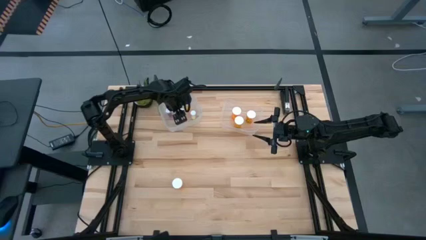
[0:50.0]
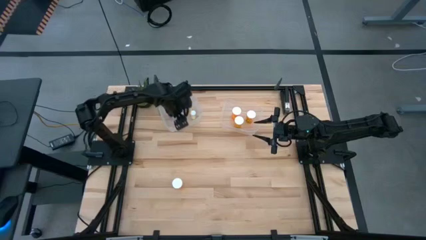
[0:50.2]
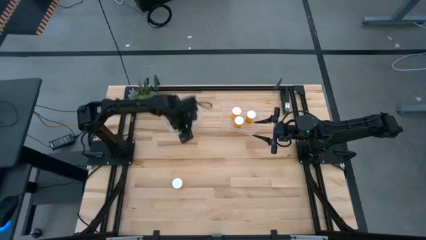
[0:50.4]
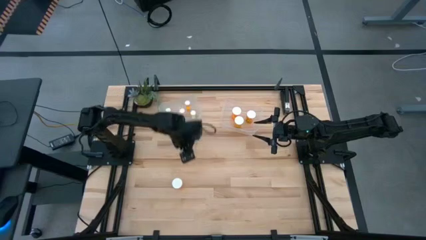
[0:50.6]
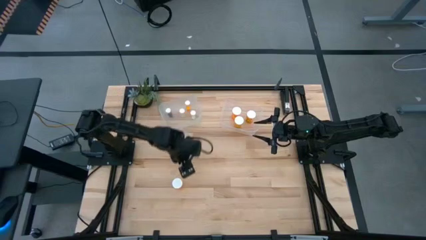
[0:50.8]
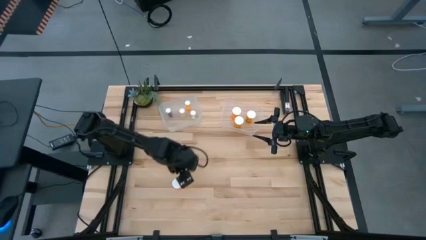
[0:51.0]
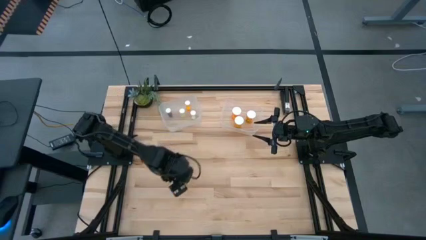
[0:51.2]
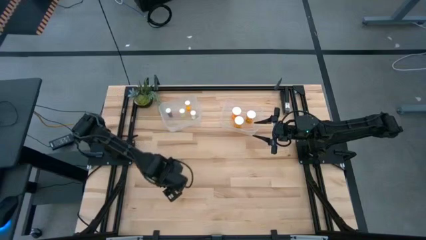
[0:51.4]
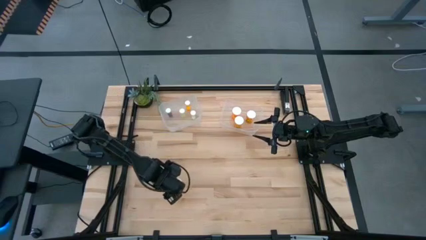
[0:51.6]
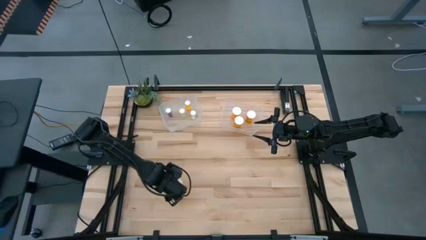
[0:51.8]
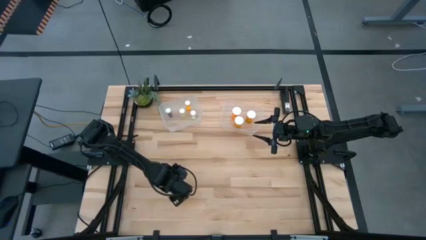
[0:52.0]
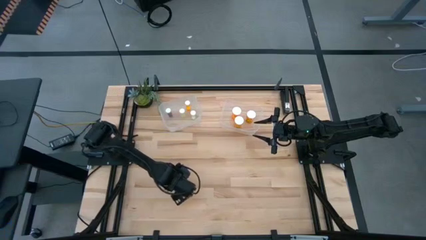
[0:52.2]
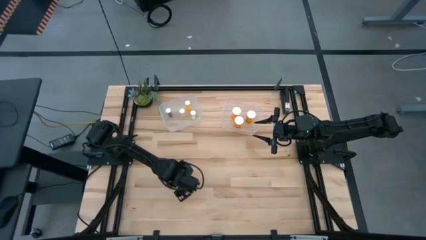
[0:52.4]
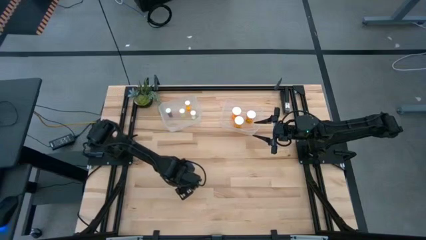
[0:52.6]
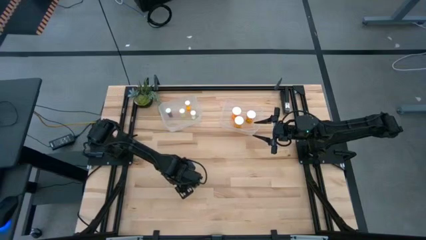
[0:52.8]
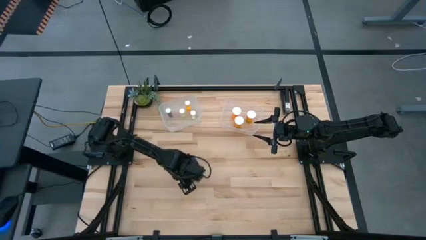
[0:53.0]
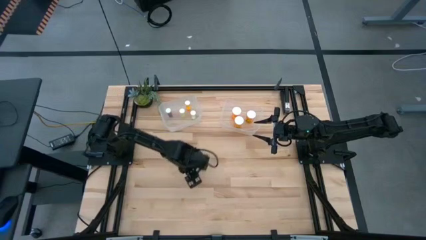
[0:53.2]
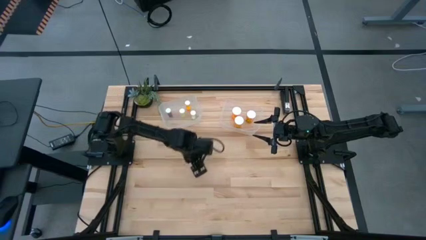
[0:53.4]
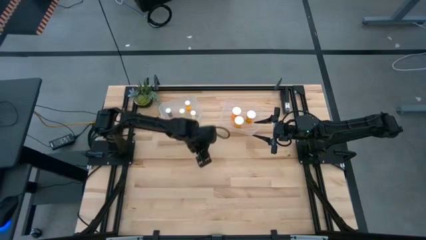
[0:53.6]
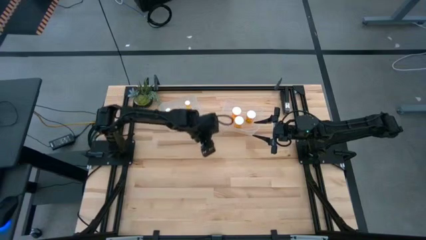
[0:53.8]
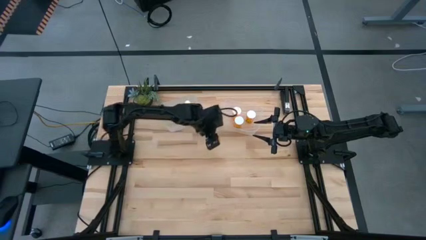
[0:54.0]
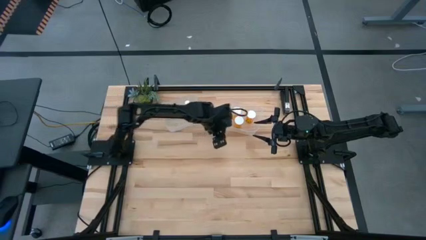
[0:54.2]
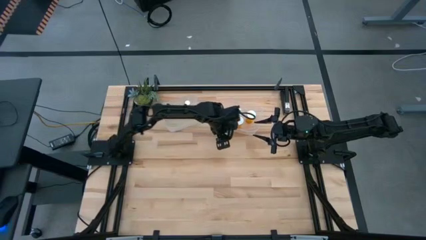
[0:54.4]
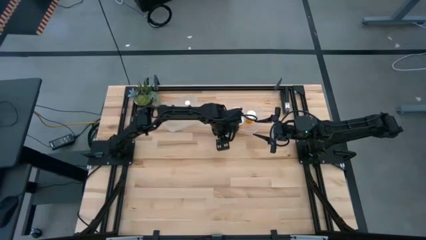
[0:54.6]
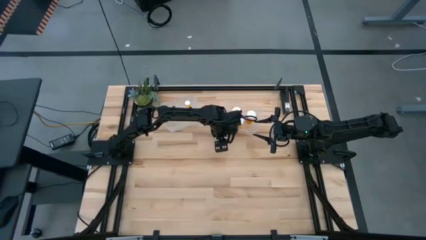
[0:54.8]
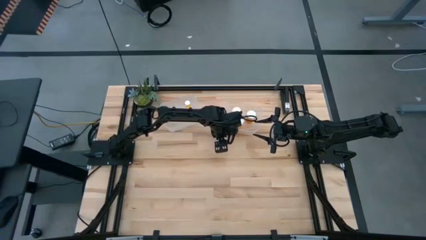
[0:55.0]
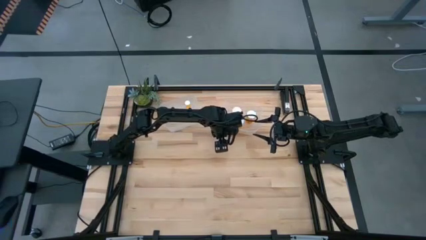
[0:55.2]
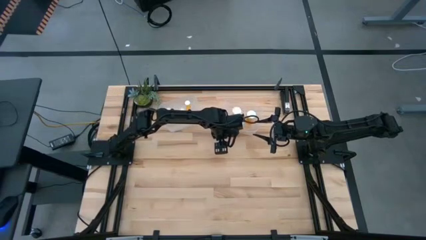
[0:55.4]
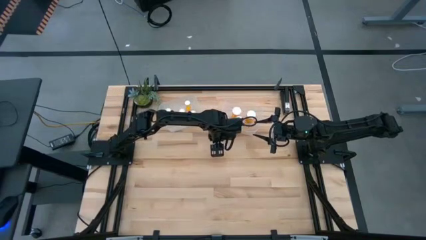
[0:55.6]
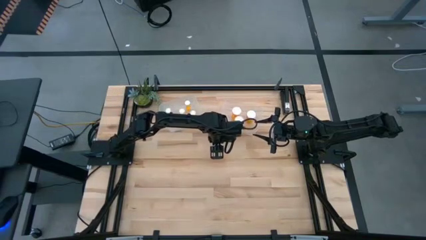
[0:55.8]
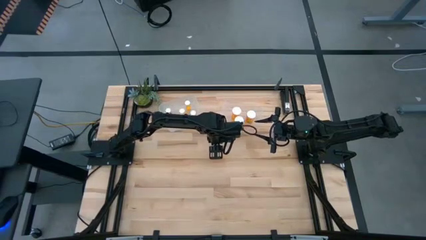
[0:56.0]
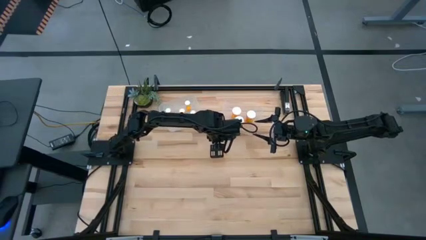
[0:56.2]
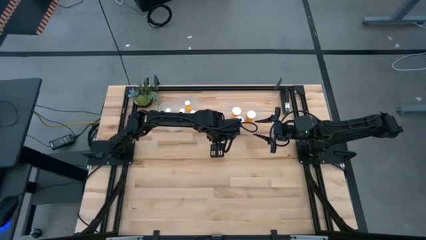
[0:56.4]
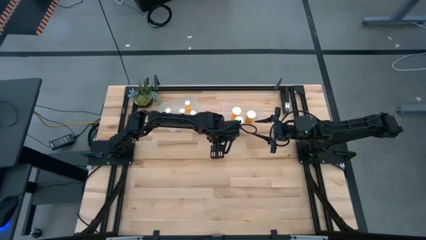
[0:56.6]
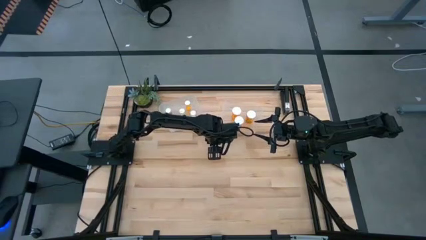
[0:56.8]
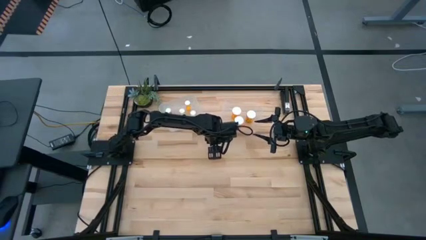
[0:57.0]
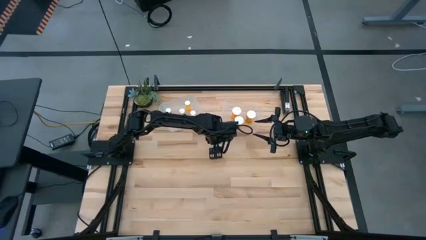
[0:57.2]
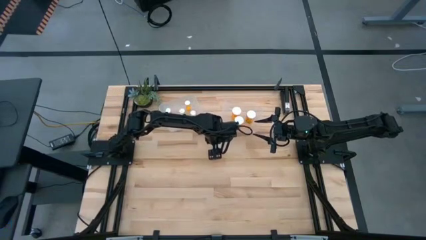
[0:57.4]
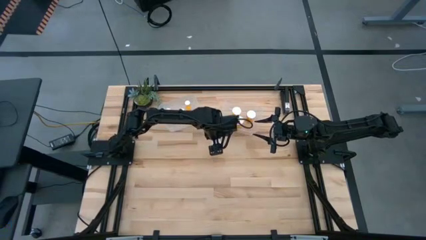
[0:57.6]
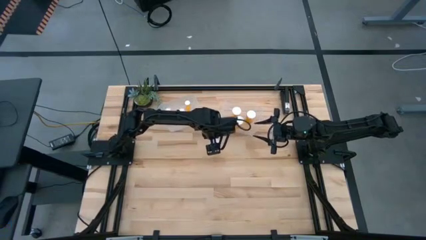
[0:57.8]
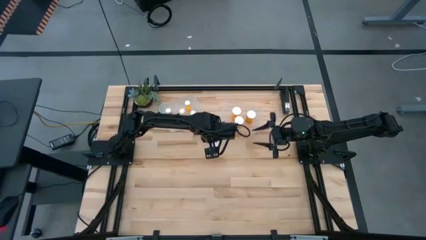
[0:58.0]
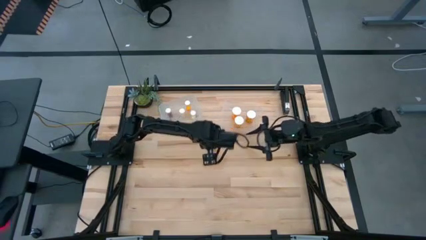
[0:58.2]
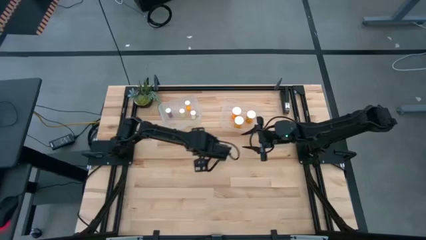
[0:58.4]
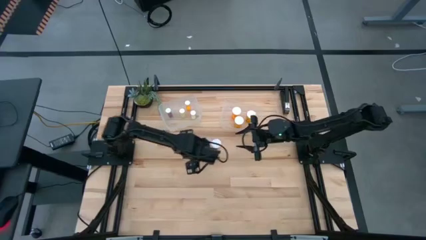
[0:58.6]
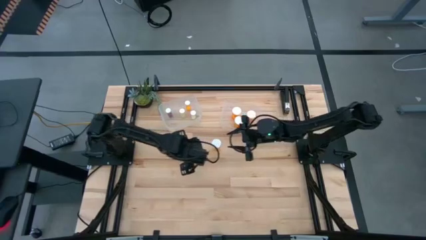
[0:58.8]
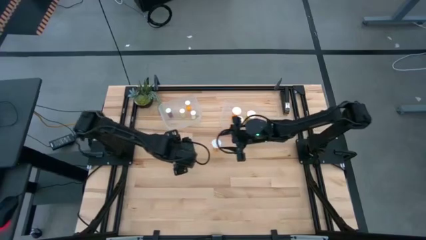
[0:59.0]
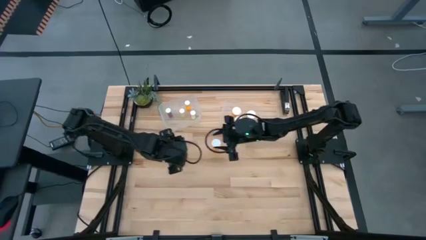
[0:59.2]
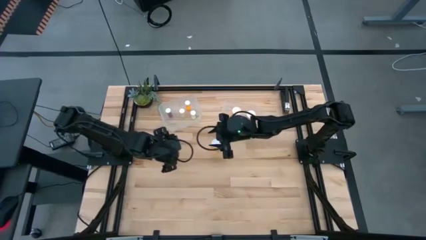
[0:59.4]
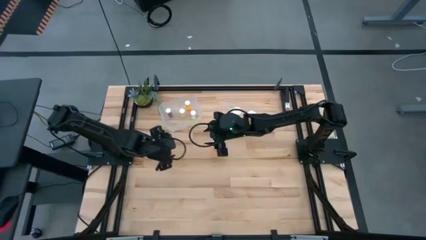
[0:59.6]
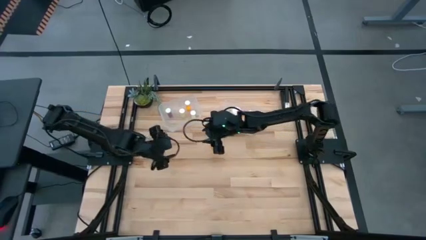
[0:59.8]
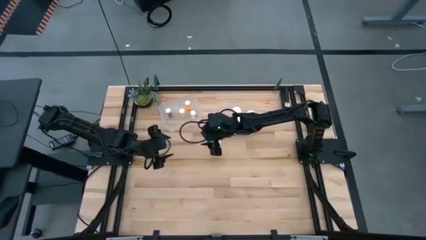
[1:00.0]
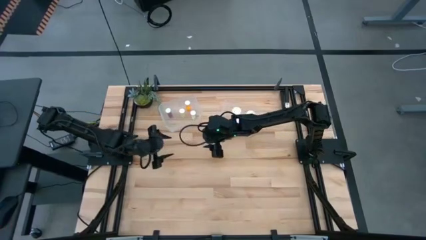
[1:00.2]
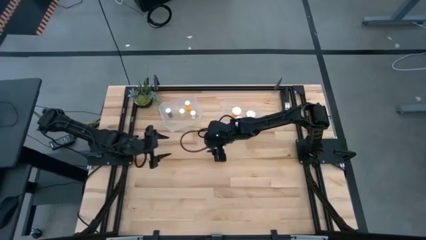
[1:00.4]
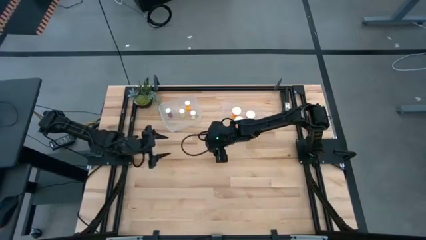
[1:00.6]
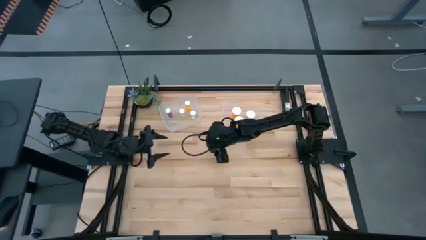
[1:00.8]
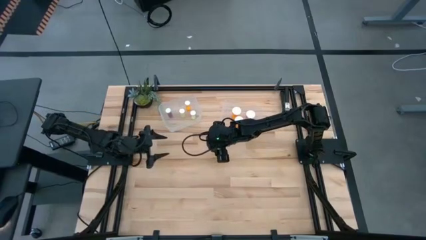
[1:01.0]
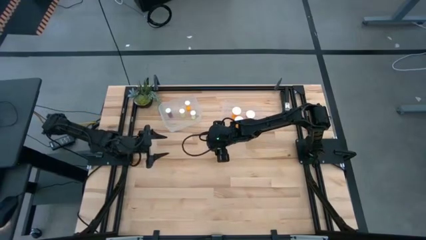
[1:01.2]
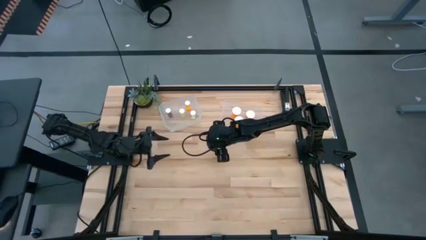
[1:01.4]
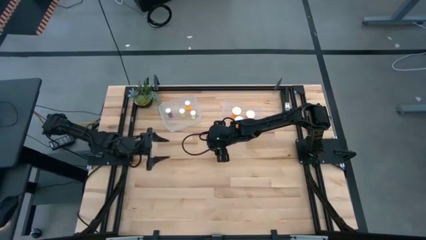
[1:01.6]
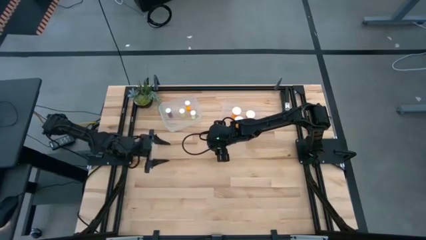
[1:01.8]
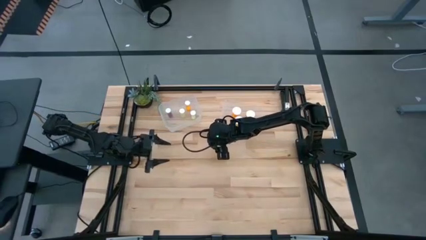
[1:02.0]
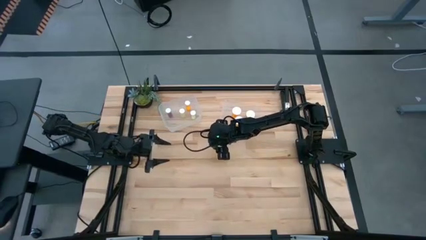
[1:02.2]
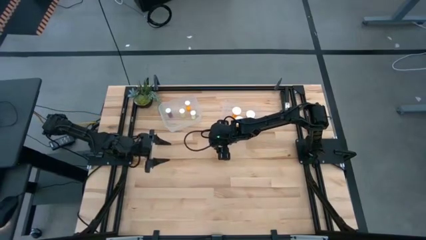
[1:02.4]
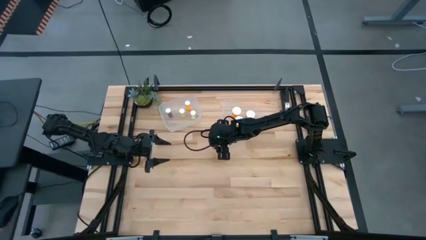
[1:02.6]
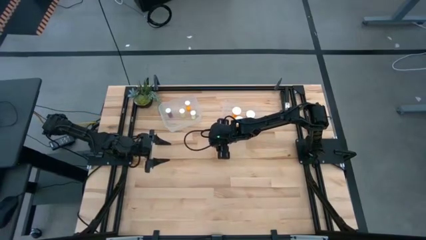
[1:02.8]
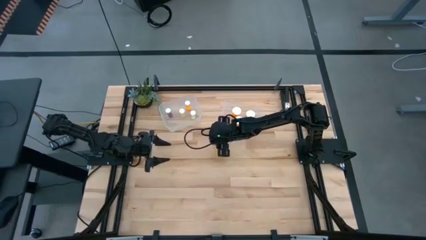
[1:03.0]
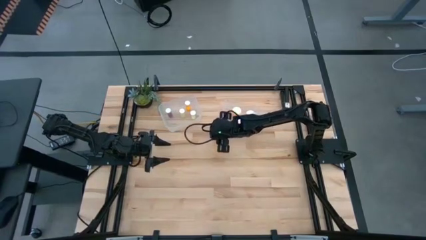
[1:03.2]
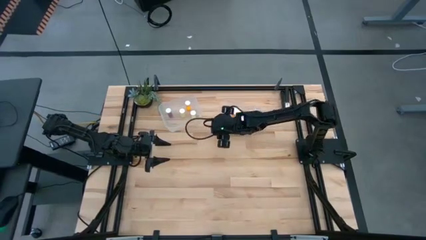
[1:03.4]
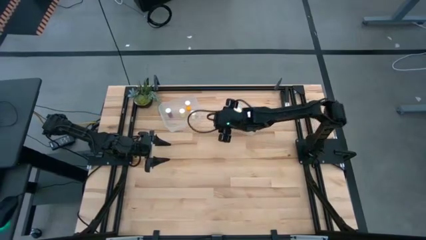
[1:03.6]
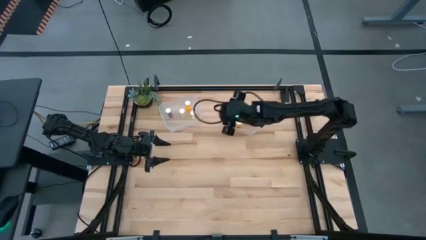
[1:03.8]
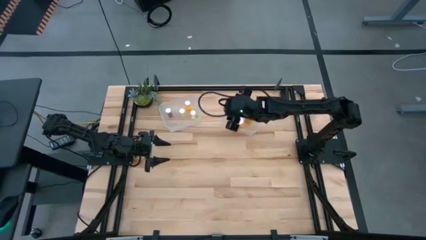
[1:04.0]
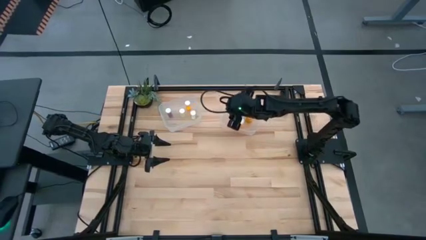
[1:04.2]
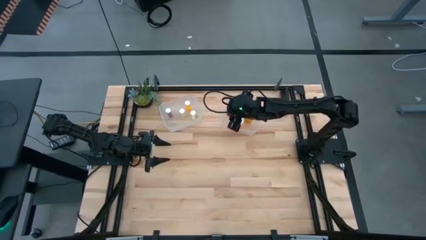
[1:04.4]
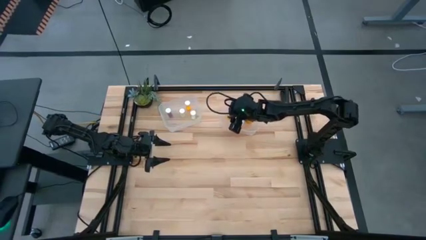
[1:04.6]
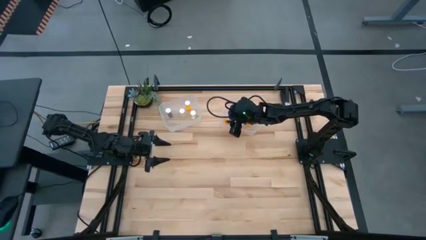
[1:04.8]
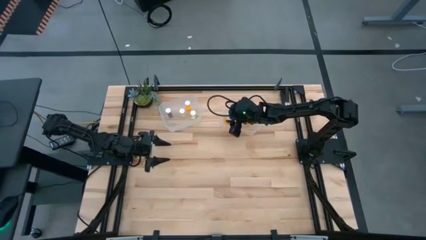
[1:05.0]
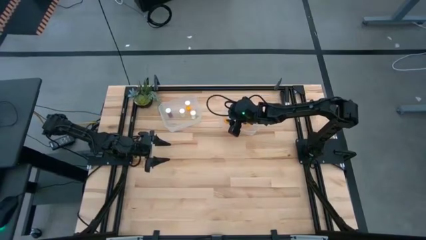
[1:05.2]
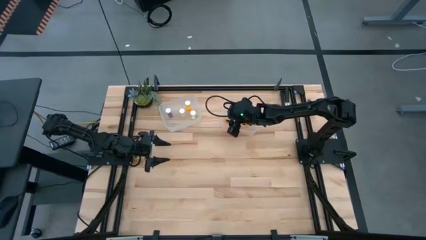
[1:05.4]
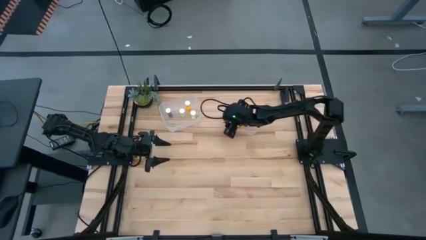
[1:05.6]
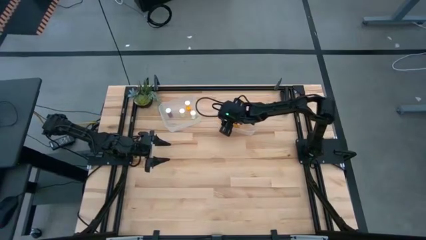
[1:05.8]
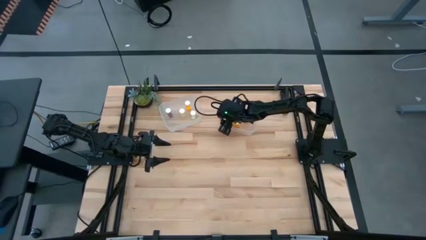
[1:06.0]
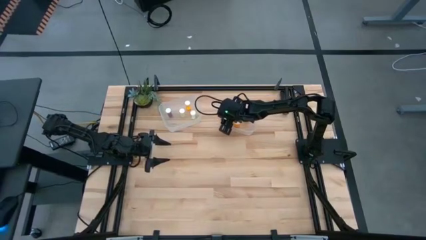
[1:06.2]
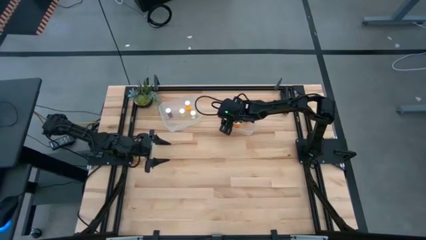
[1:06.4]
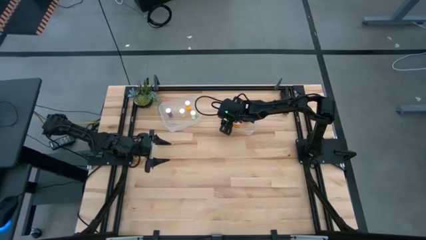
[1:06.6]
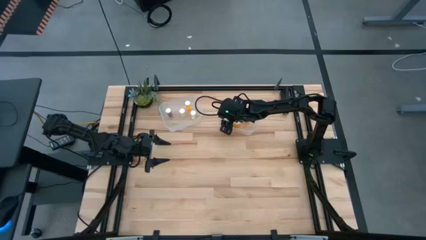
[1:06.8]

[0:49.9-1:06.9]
Task: Pick and place medicine bottles into bin by pill shape (circle, oval)
Put the orange pill bottle into the right bin
